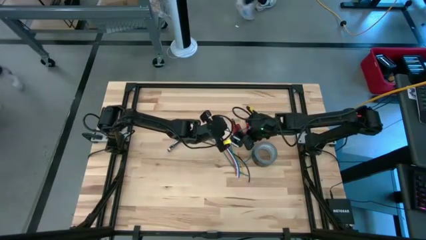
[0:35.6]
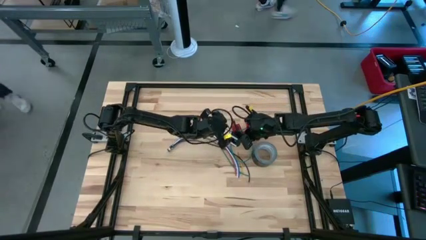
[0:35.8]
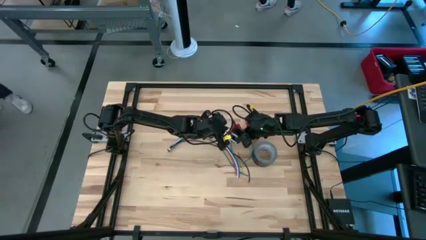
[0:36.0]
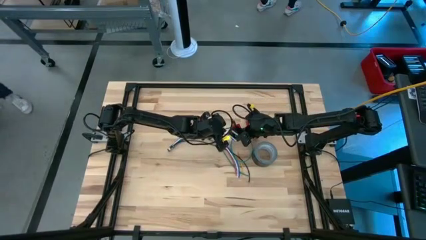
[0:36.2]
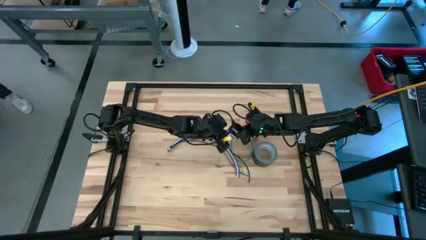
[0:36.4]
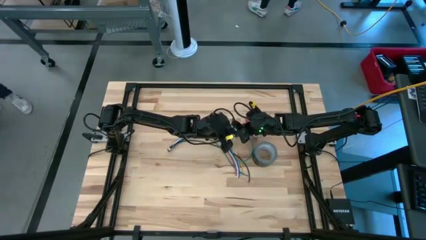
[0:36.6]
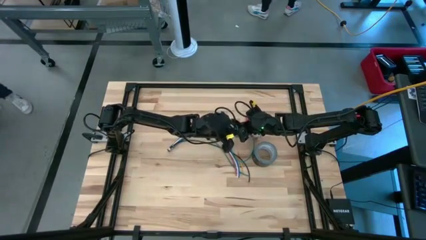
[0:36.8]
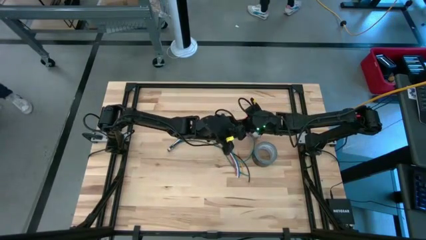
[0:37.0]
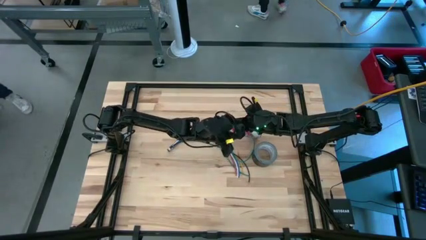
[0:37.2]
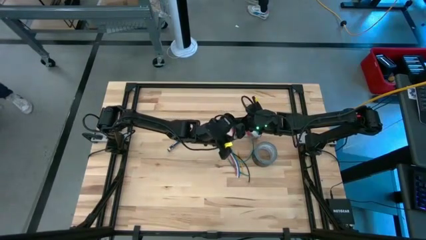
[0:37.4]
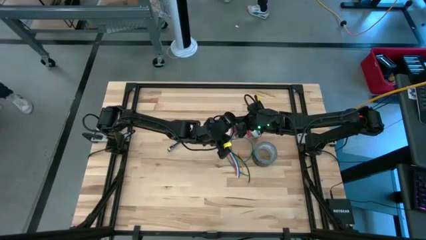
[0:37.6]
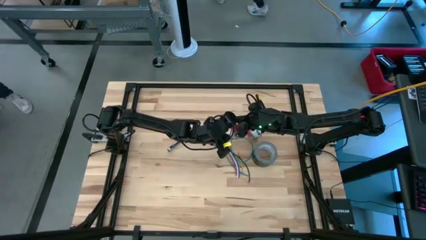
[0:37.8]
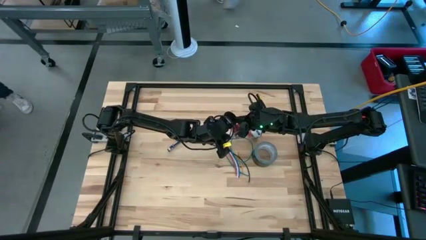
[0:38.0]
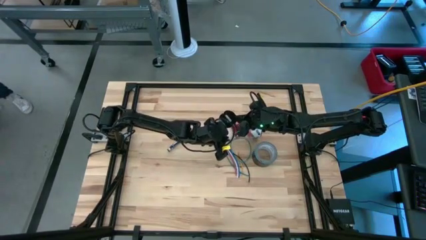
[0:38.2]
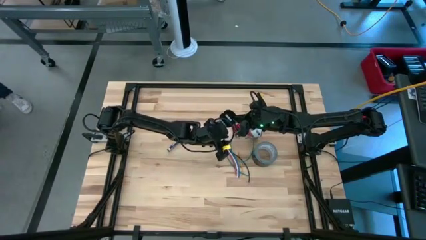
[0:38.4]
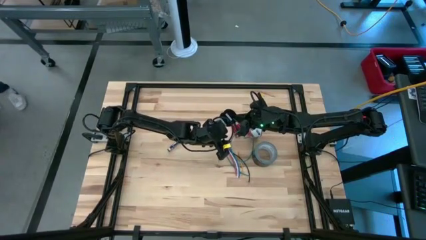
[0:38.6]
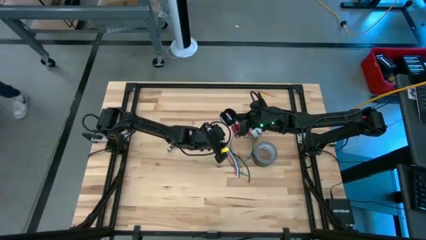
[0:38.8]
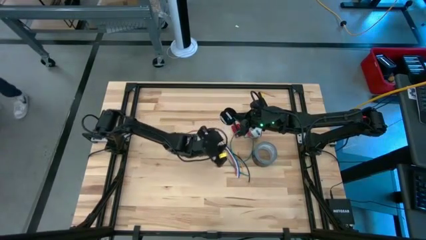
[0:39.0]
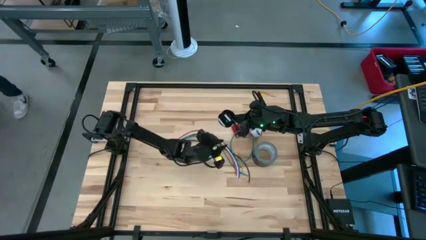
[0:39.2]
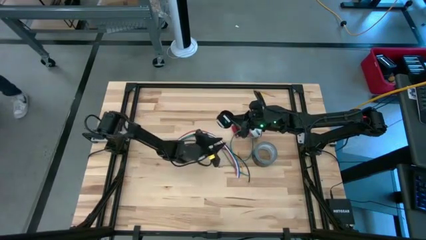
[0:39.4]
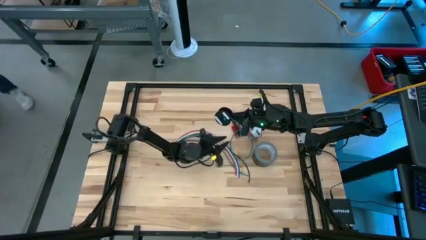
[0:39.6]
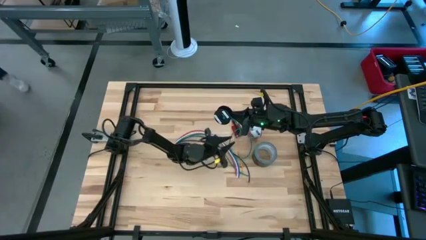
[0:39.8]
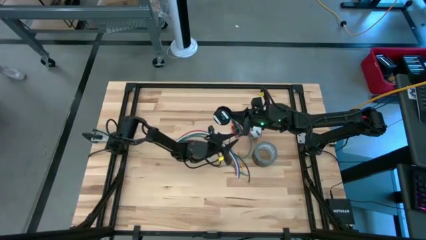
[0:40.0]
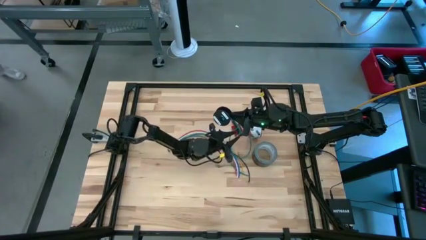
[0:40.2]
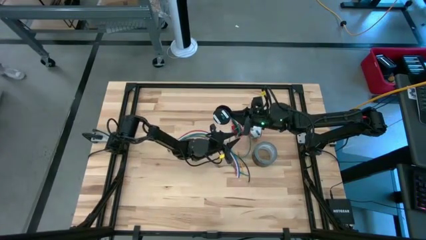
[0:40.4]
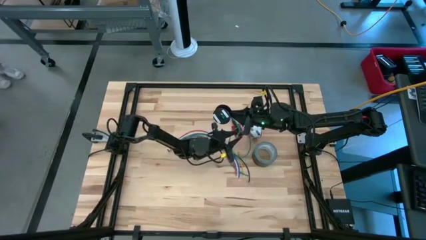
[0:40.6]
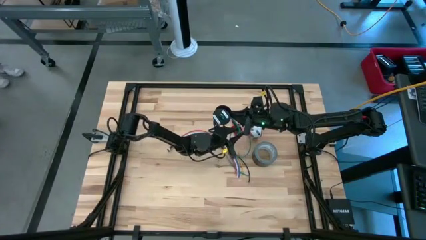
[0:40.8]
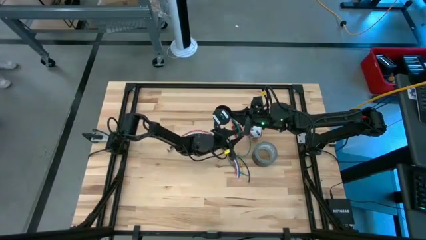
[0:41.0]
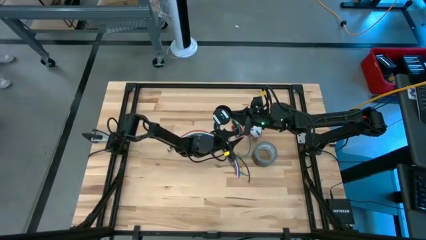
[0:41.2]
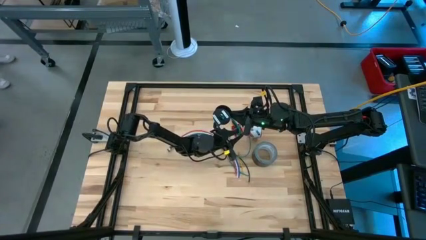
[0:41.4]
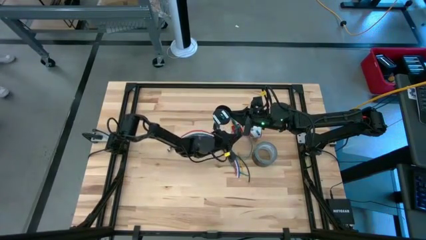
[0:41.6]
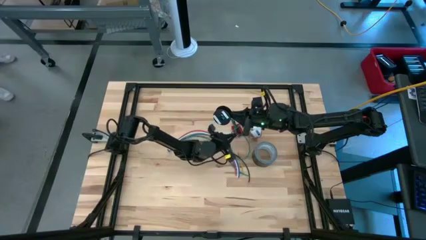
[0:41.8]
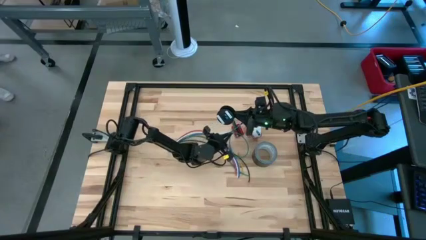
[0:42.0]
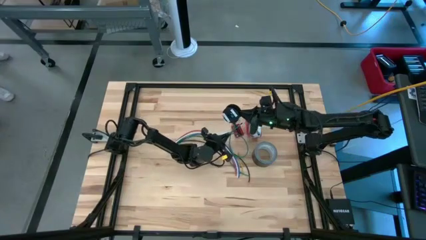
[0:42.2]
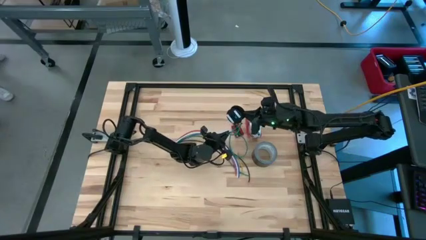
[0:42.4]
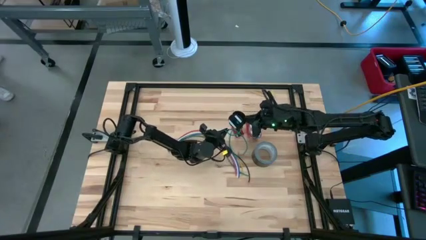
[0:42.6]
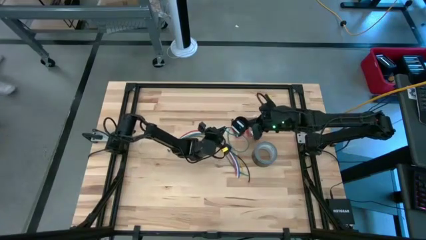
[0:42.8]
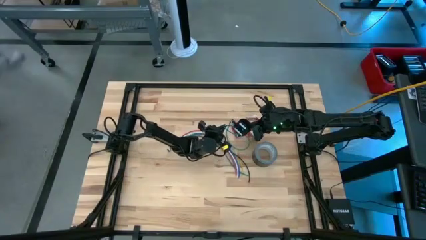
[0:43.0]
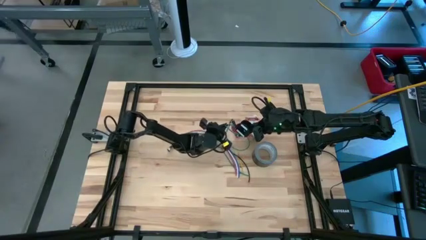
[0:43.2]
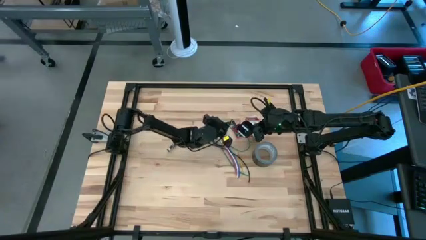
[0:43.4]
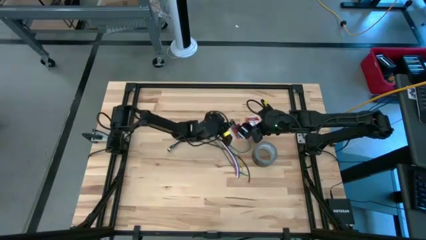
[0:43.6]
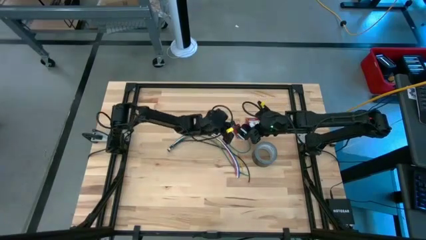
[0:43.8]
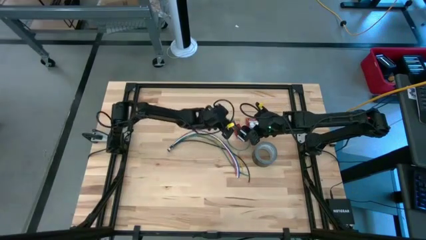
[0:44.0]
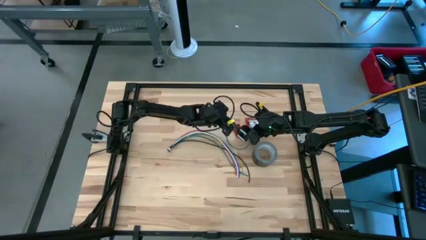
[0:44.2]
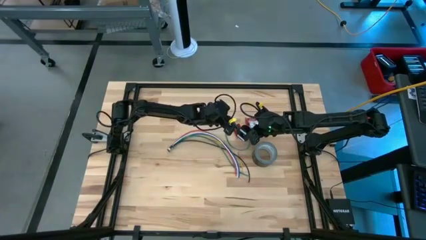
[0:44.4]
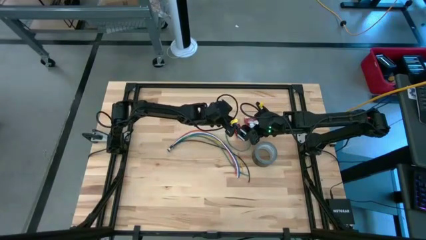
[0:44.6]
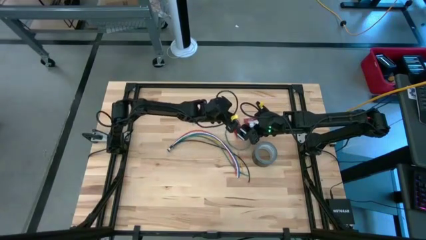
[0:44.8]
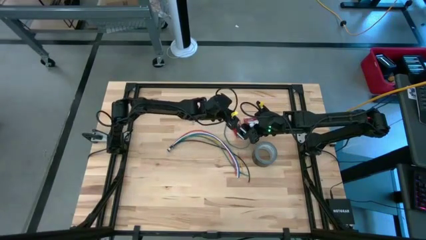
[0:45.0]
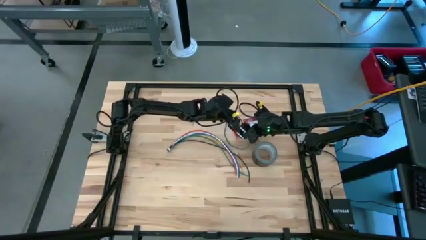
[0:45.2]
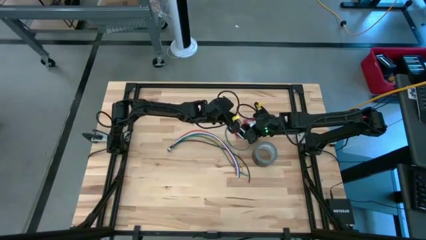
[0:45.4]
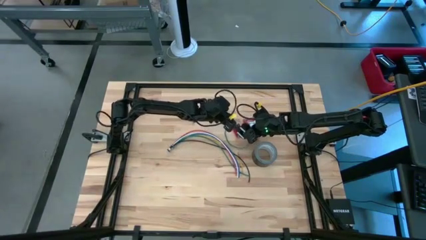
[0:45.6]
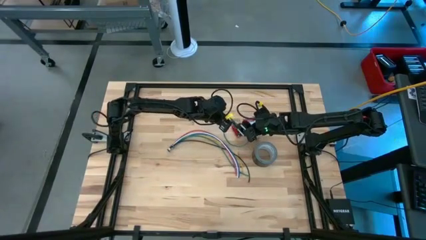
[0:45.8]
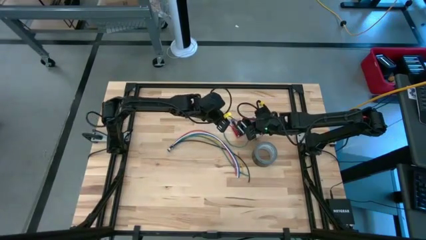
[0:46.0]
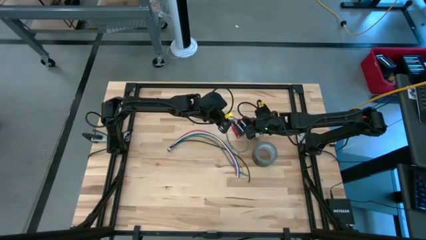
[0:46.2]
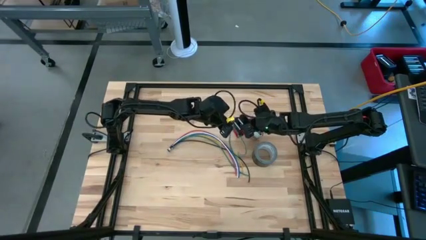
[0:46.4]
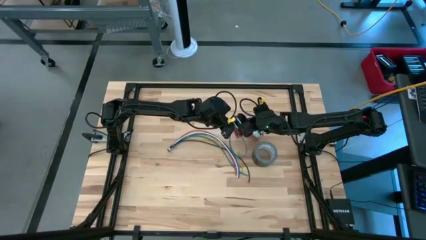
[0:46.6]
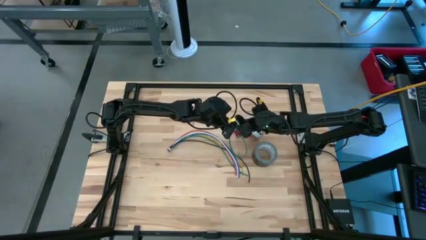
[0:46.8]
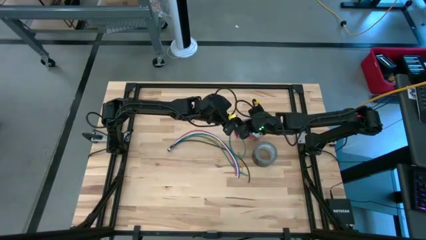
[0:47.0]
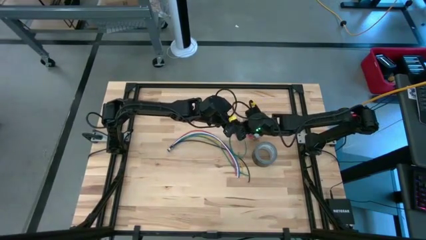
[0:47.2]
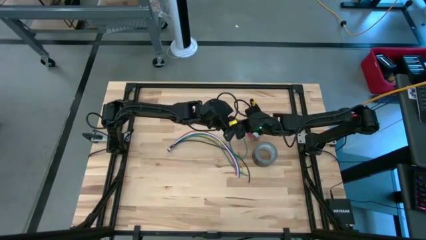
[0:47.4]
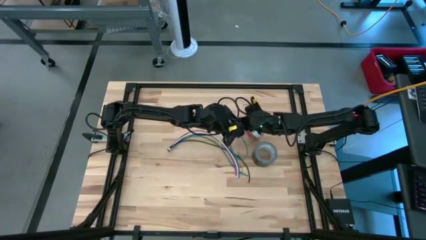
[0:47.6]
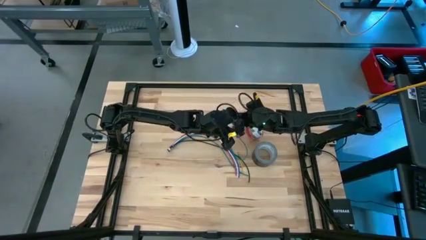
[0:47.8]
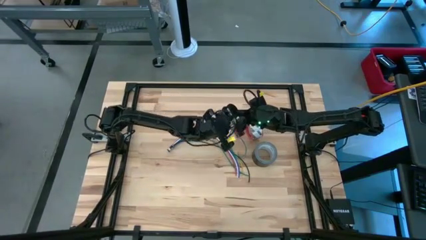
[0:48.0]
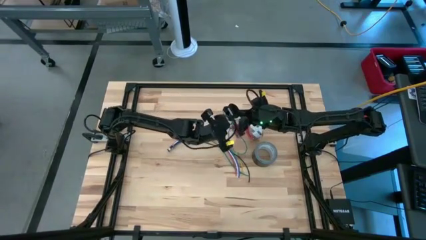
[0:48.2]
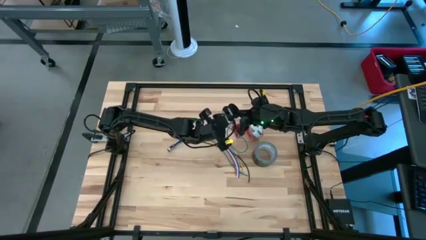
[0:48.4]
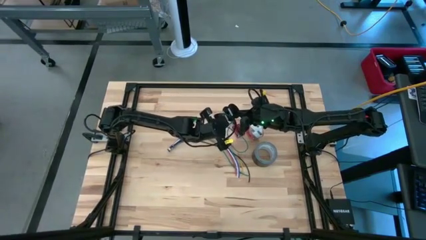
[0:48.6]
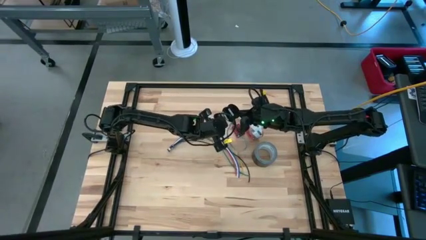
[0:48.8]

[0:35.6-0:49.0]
Task: Coil cords
Coil green wire onto the spool

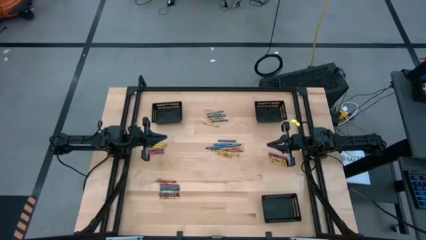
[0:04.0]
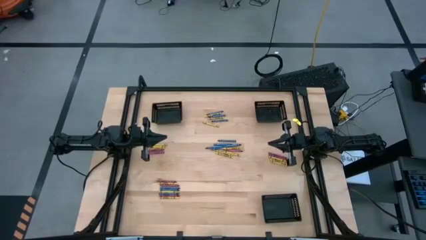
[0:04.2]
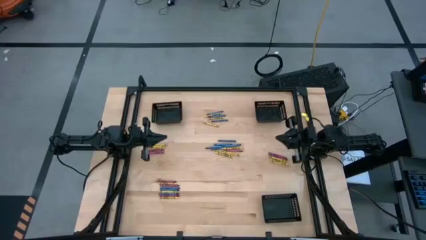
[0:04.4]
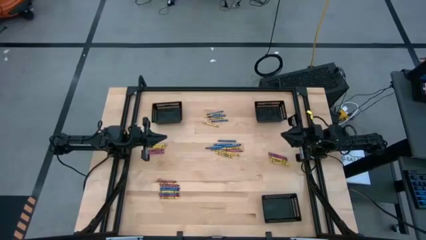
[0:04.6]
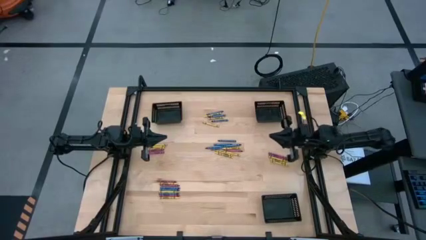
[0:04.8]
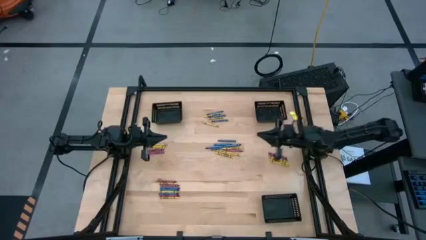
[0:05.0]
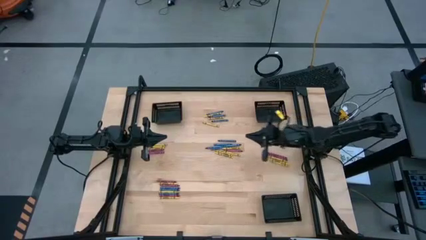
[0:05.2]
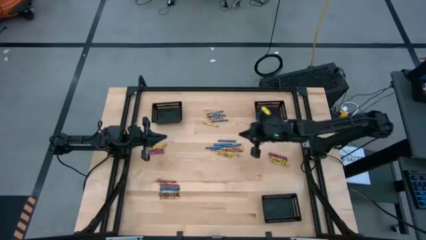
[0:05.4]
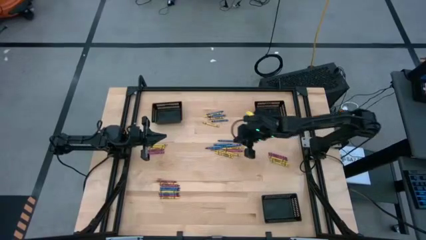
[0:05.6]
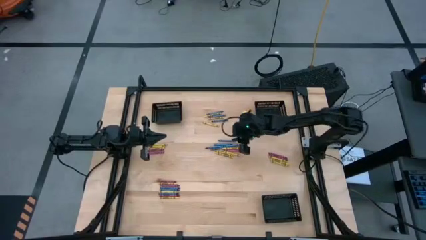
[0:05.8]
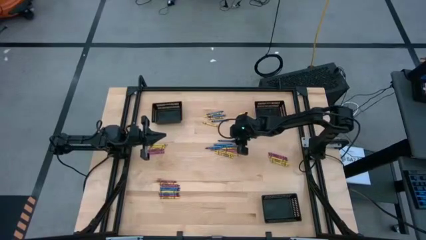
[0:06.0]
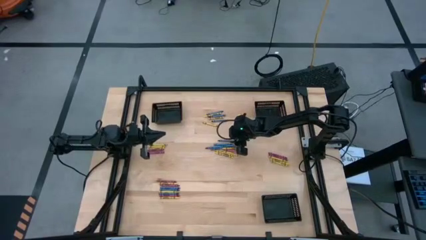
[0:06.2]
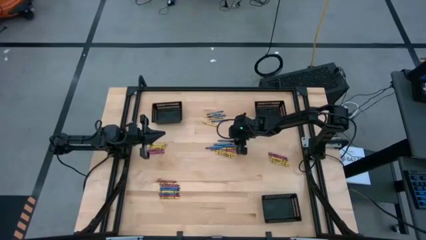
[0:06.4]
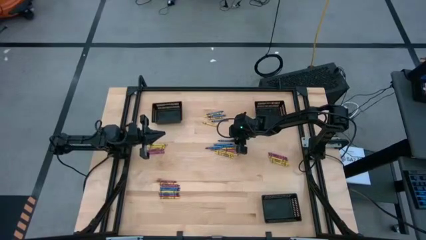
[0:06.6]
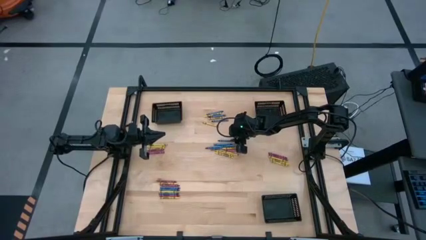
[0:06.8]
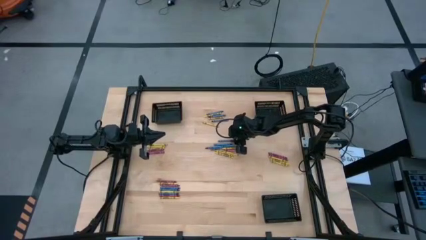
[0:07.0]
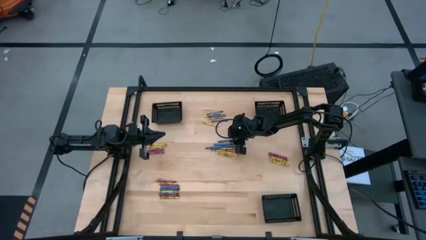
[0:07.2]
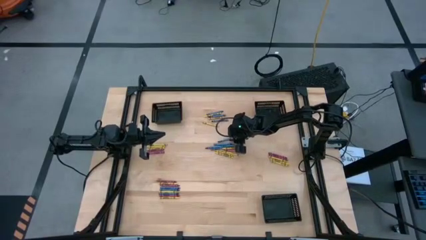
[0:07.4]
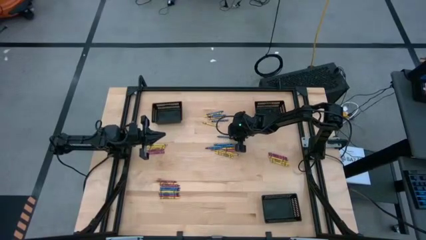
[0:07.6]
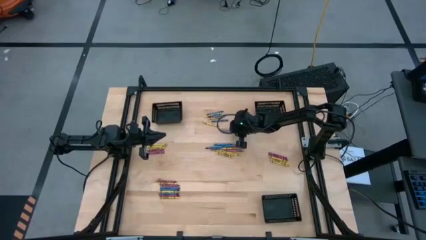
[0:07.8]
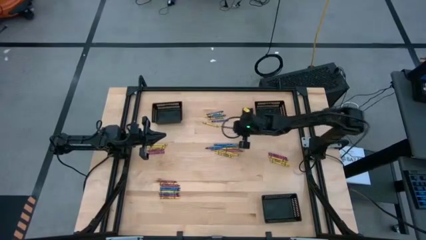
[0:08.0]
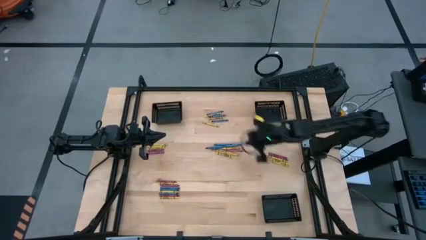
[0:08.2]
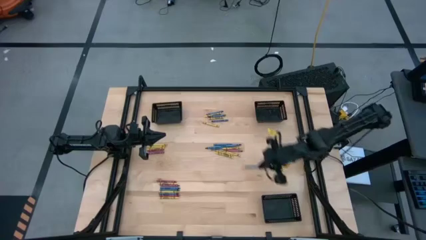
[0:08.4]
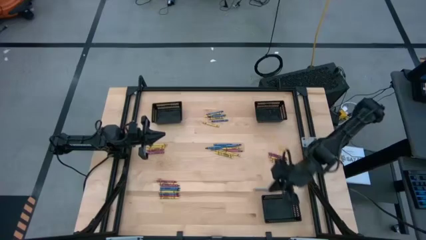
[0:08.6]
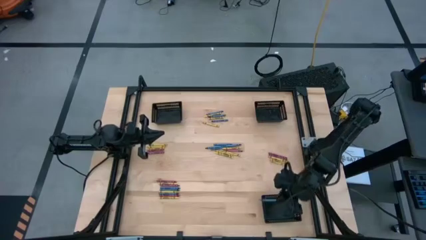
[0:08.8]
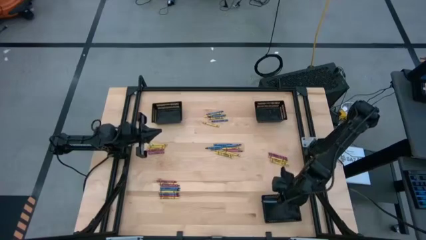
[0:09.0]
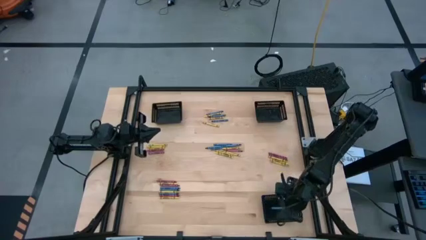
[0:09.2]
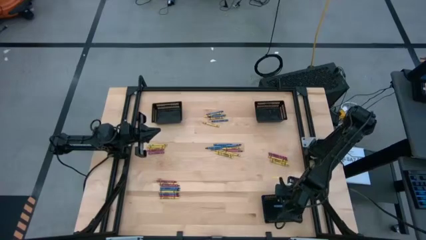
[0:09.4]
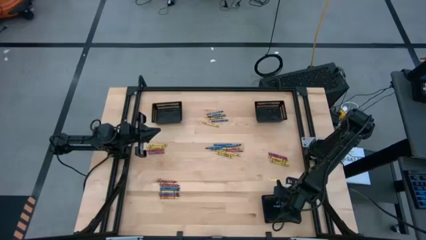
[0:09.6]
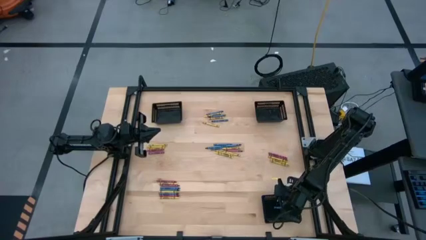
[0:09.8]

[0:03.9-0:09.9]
Task: Sort crayons
Put the blue crayon into the bottom black bin
